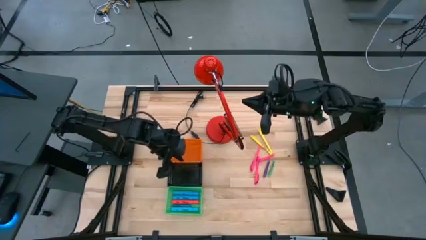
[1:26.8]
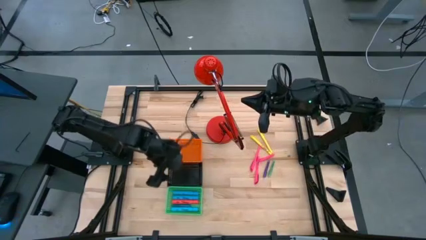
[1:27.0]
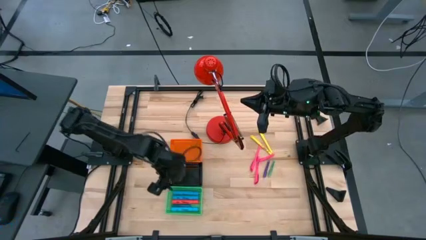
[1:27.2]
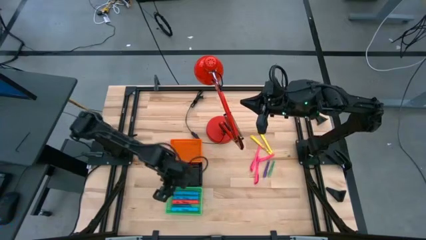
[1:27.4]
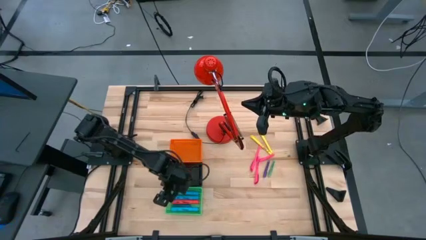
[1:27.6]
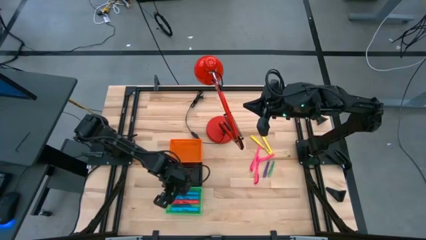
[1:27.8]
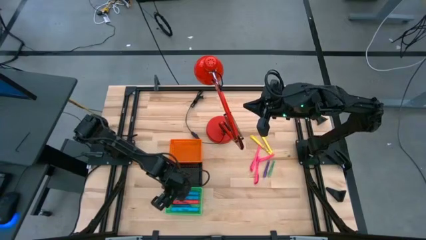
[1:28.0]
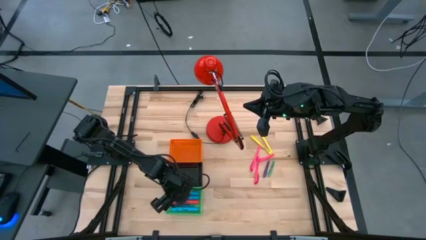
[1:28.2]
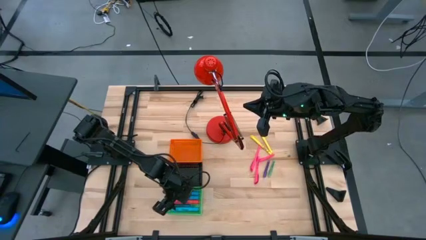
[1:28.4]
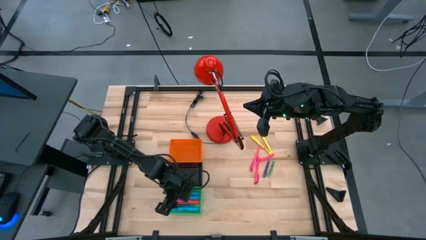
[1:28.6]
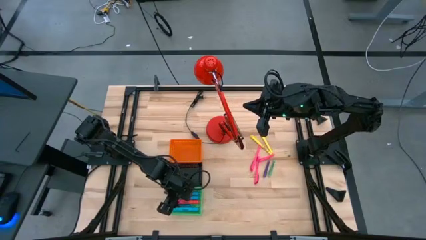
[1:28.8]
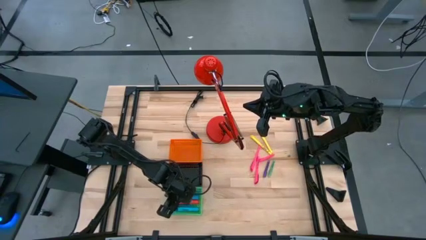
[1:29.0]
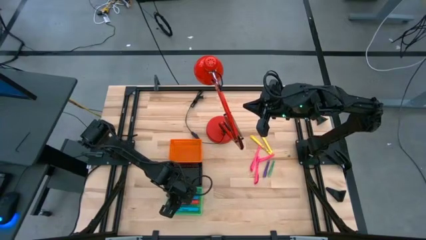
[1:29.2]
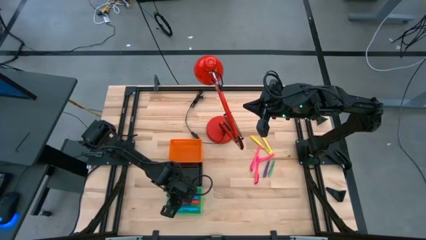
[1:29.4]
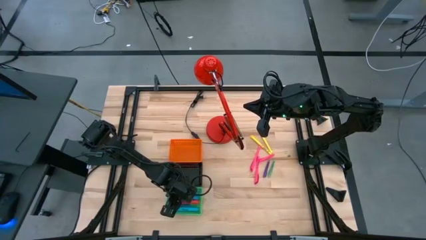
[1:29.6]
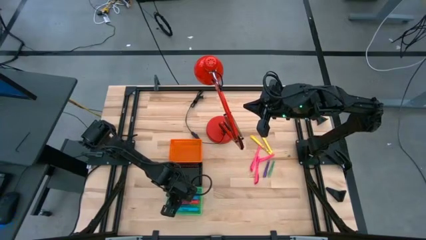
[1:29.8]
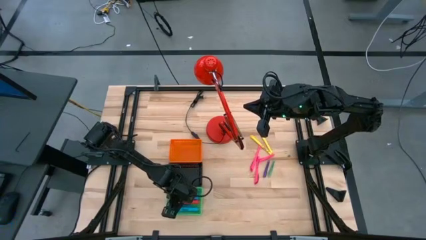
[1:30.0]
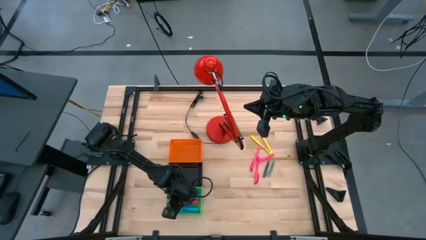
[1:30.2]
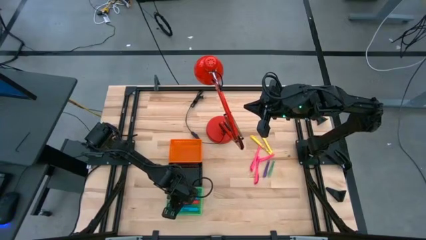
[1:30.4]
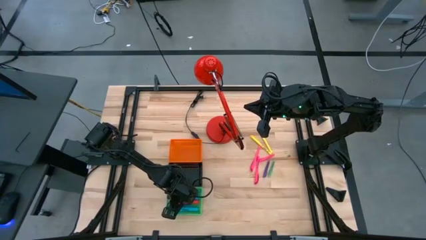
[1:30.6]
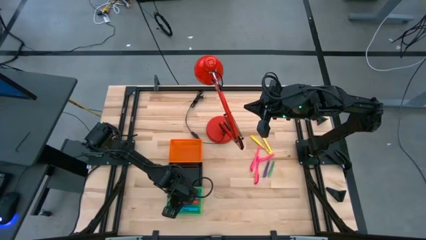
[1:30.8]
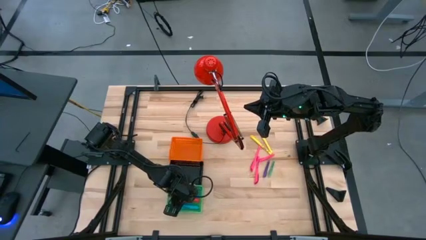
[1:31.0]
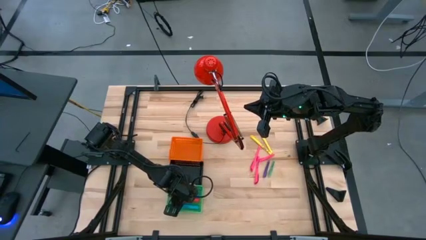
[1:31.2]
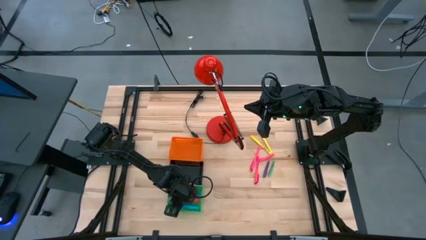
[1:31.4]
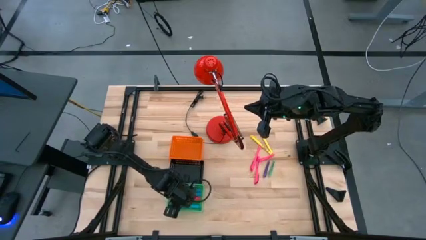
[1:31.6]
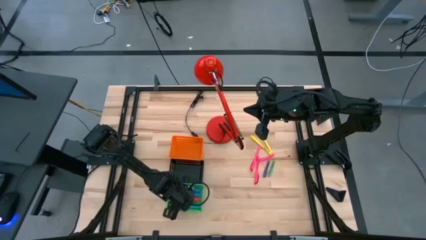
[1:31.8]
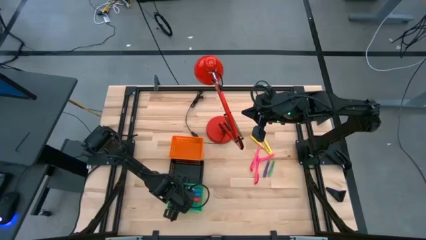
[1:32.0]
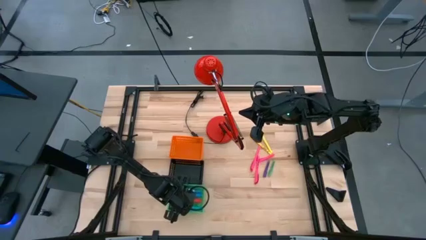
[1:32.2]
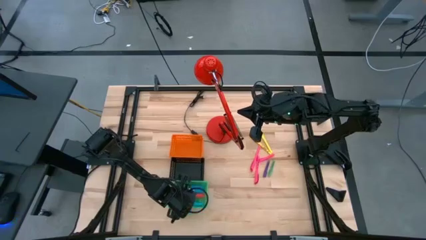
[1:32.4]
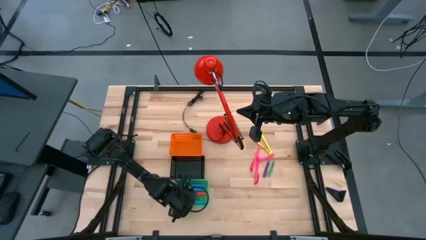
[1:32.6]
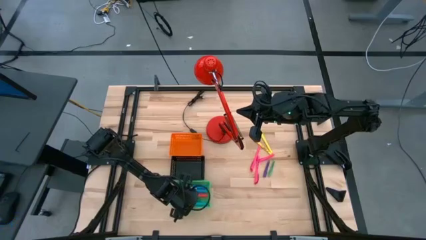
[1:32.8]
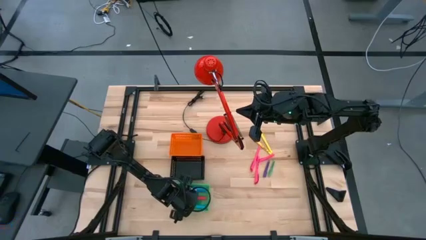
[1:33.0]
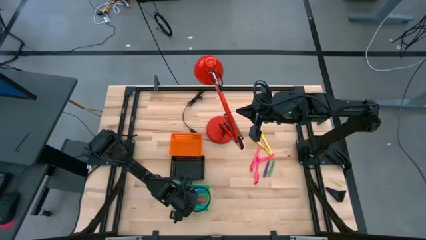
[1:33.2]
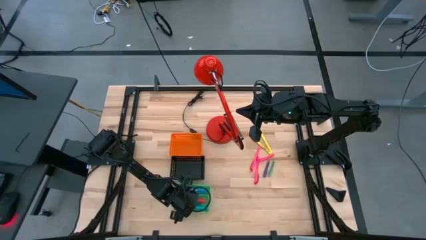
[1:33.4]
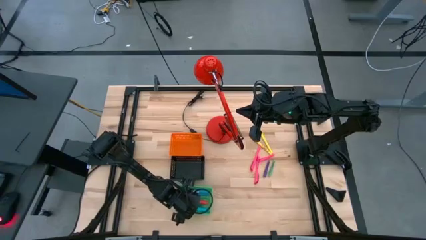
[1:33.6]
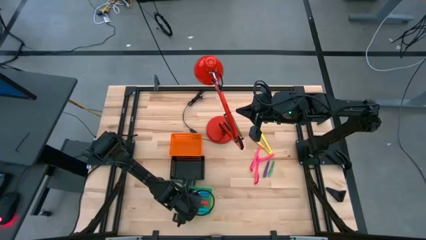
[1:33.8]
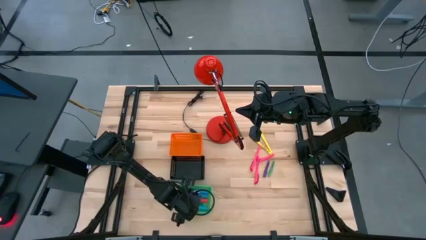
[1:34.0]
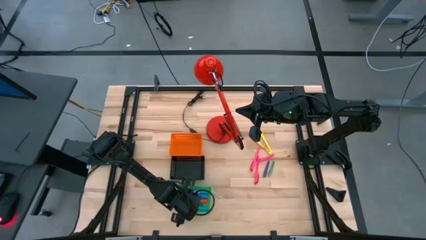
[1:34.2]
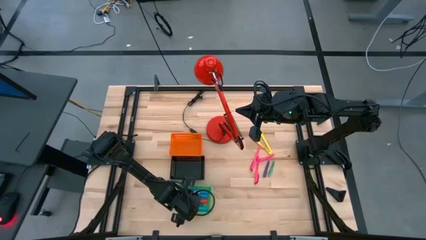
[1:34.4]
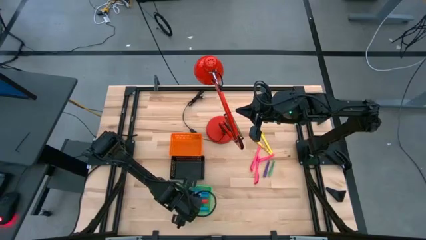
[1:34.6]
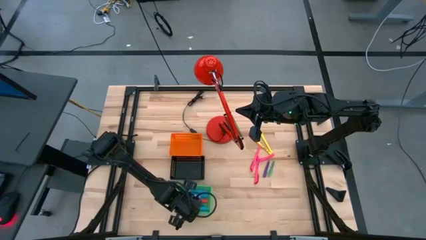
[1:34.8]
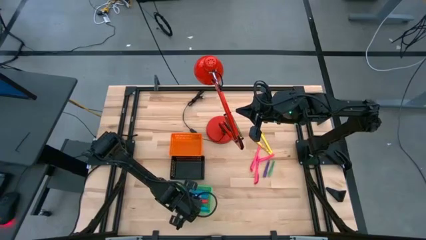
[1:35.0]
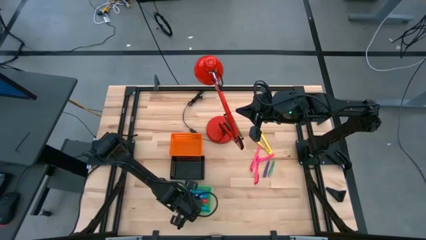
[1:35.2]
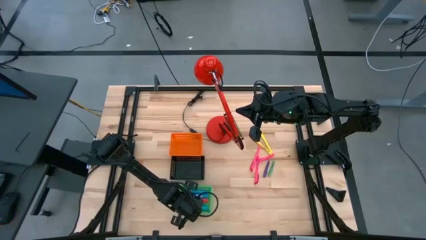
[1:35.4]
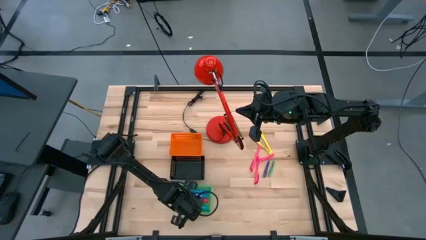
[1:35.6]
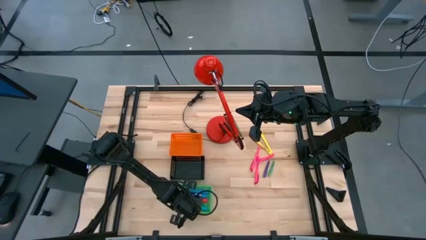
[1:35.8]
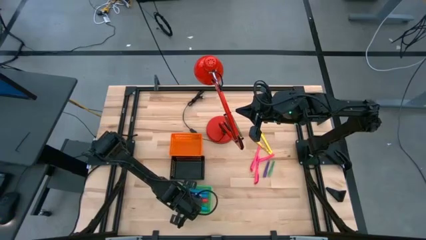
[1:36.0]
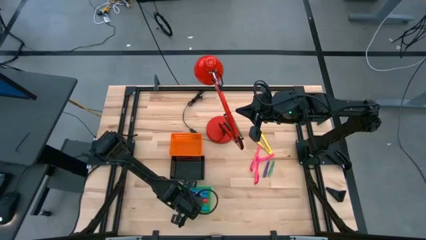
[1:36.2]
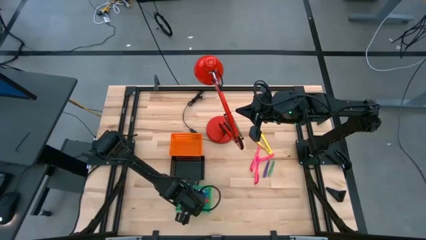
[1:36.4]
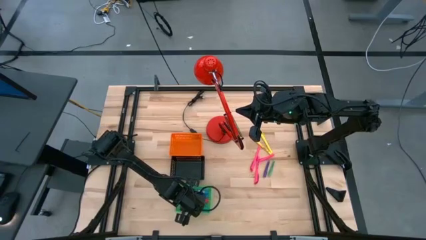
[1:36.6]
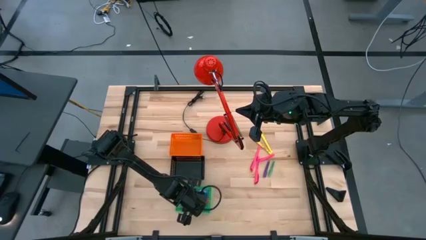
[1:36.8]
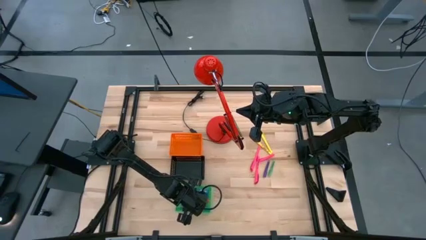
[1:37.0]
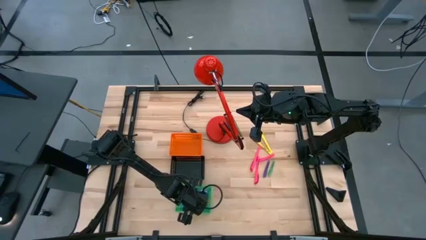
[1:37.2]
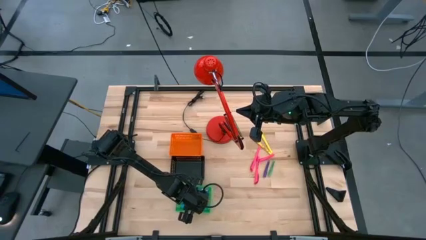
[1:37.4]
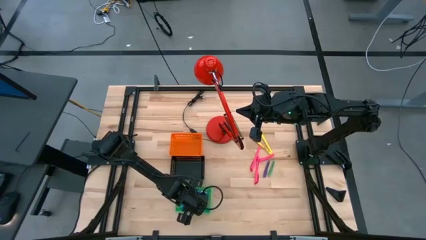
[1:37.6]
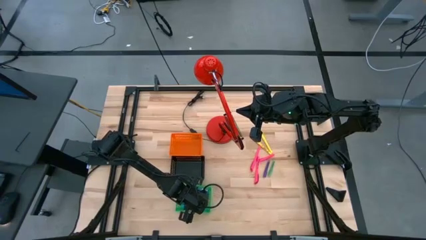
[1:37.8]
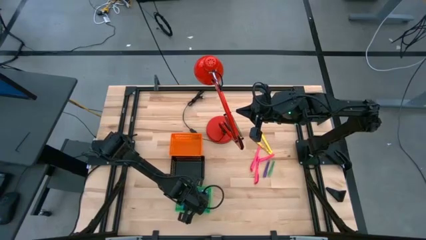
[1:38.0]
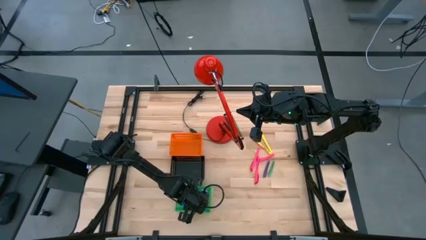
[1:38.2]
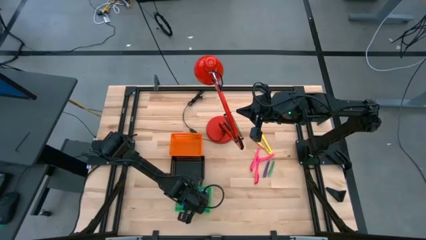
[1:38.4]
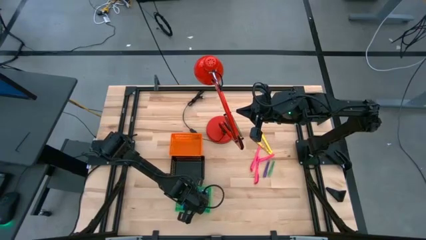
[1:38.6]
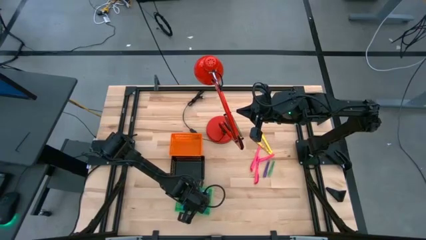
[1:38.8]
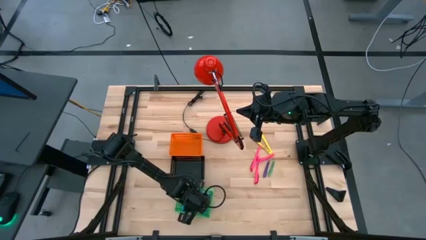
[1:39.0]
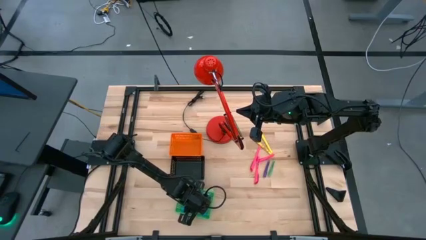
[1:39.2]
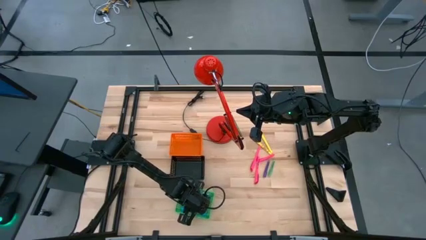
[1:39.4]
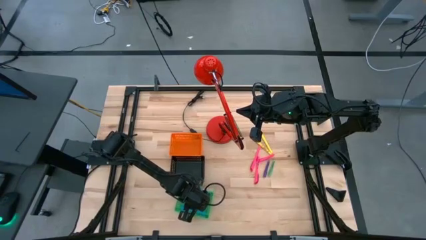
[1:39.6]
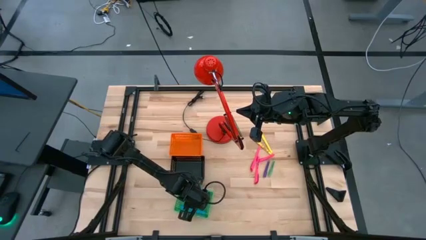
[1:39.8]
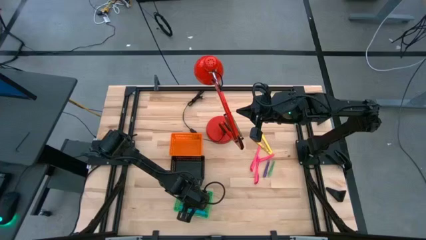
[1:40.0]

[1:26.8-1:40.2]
Task: Pick & Place Markers
Put the blue pen into the black bin
